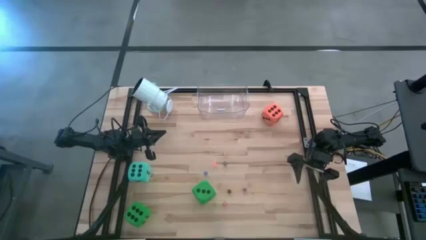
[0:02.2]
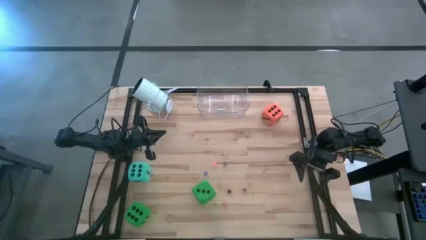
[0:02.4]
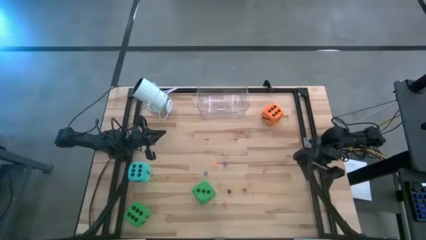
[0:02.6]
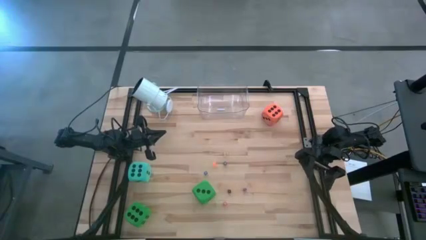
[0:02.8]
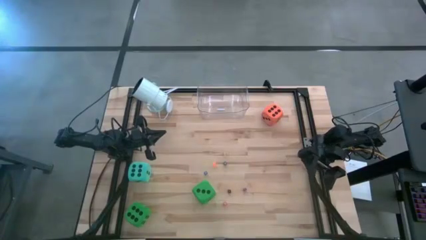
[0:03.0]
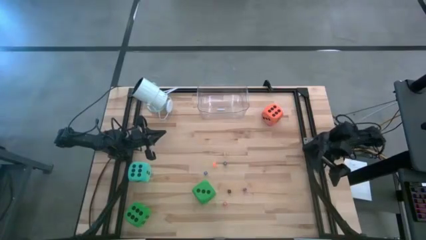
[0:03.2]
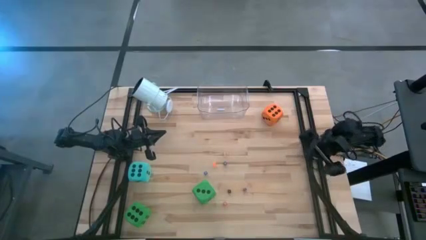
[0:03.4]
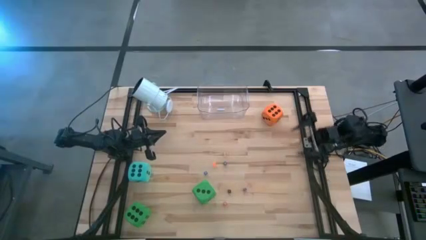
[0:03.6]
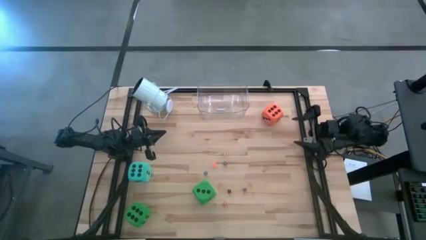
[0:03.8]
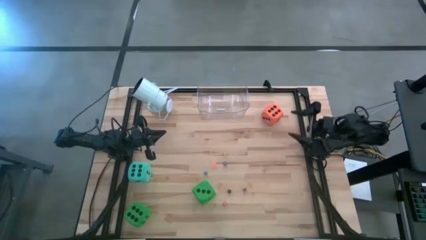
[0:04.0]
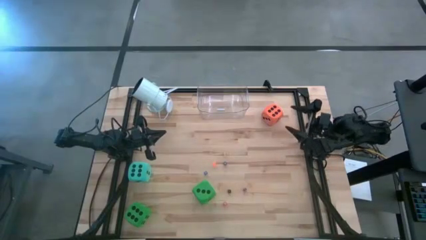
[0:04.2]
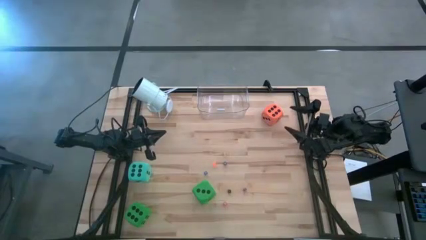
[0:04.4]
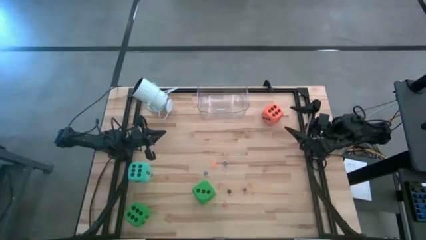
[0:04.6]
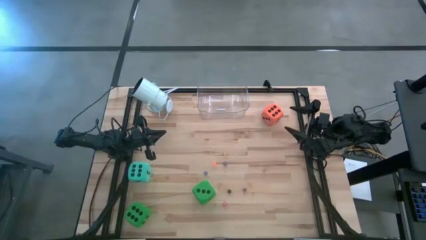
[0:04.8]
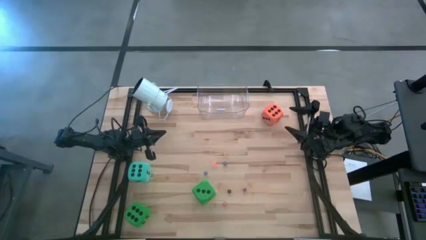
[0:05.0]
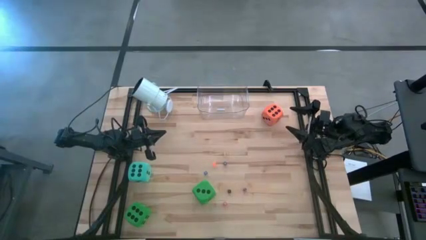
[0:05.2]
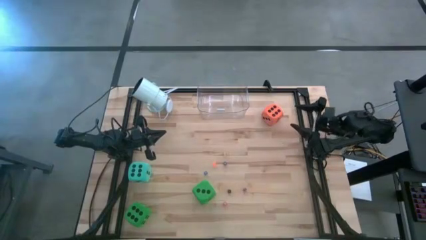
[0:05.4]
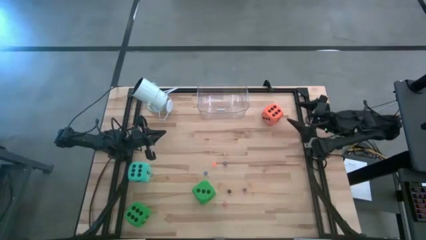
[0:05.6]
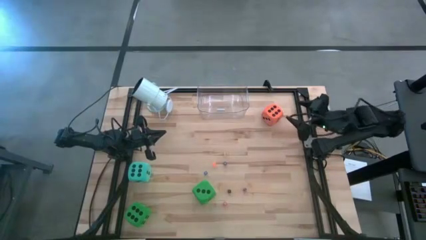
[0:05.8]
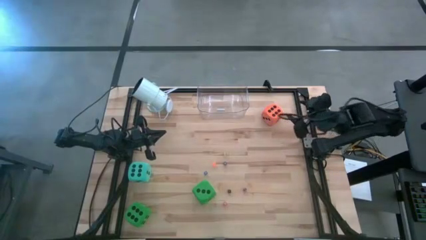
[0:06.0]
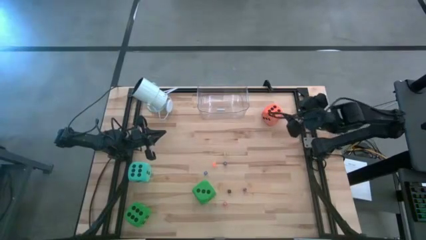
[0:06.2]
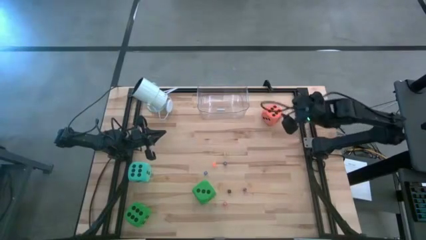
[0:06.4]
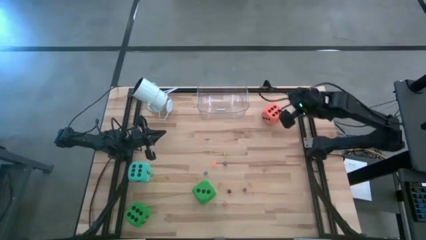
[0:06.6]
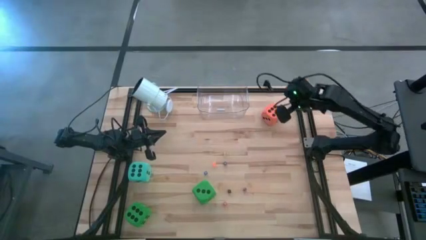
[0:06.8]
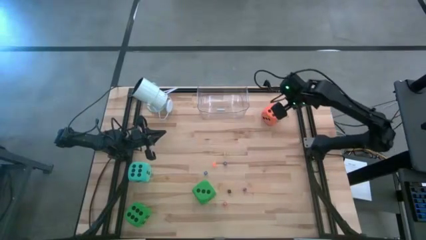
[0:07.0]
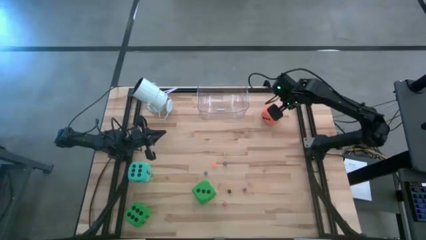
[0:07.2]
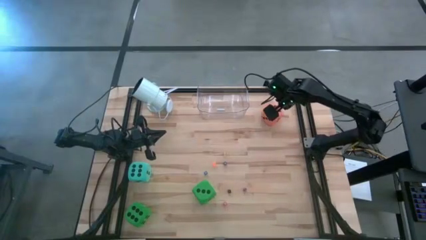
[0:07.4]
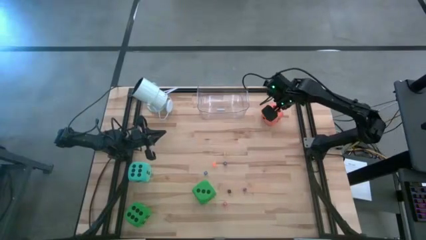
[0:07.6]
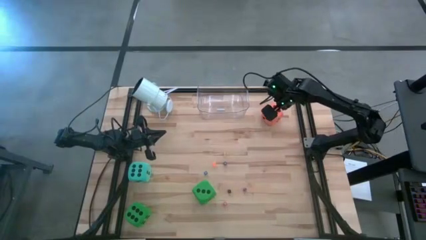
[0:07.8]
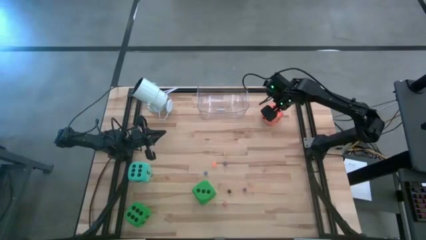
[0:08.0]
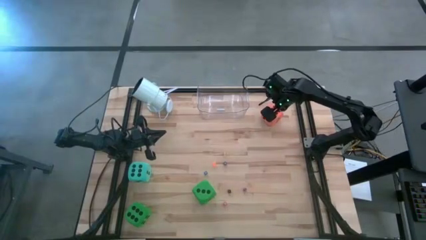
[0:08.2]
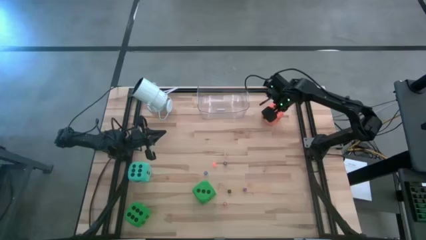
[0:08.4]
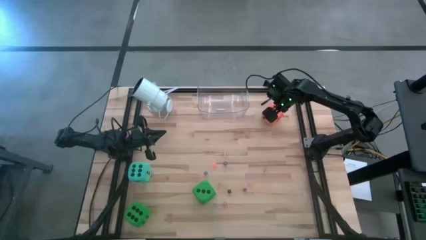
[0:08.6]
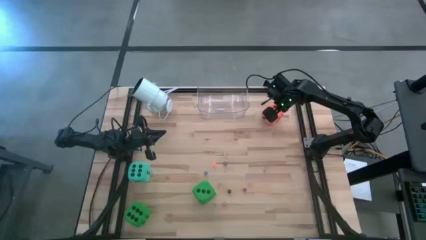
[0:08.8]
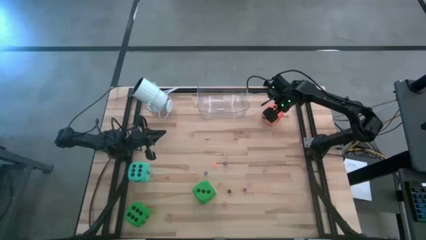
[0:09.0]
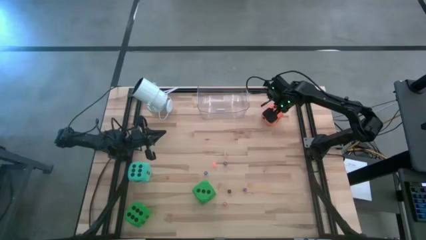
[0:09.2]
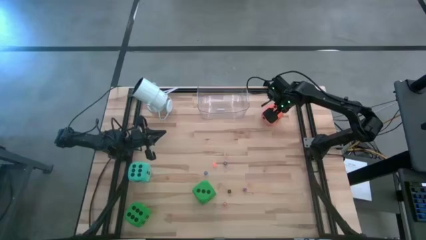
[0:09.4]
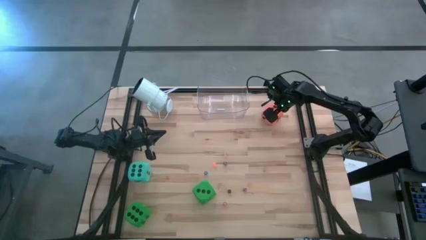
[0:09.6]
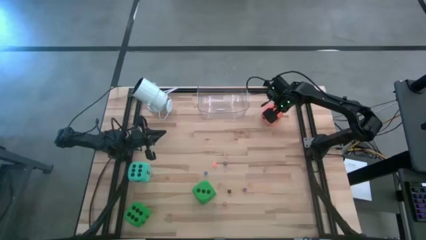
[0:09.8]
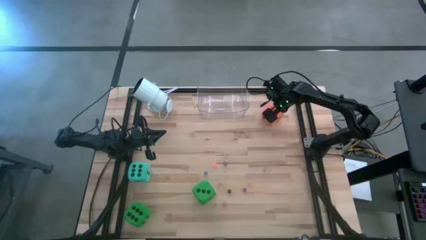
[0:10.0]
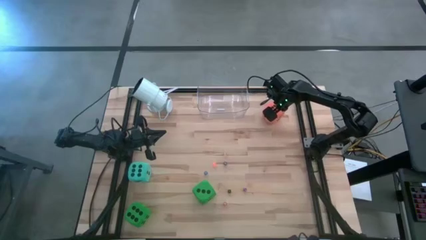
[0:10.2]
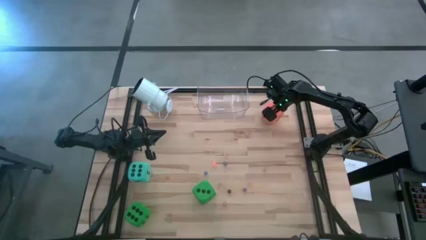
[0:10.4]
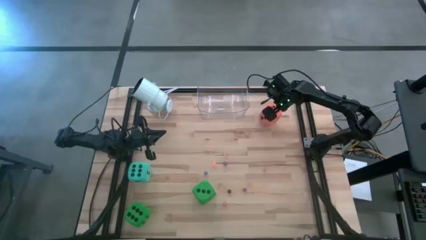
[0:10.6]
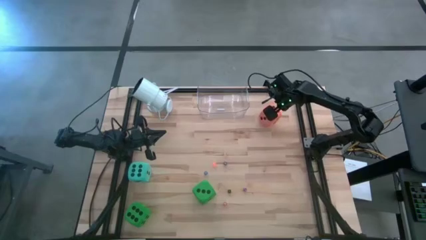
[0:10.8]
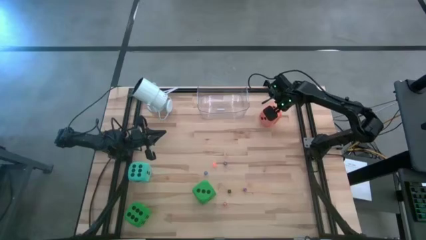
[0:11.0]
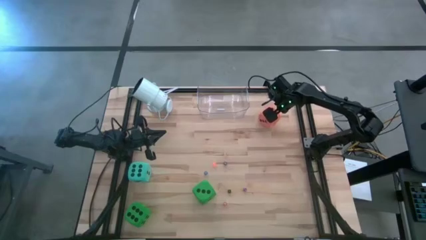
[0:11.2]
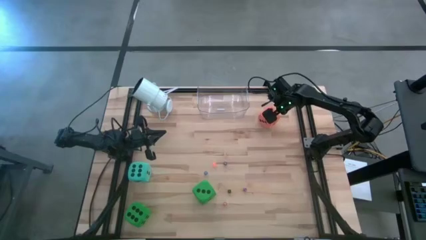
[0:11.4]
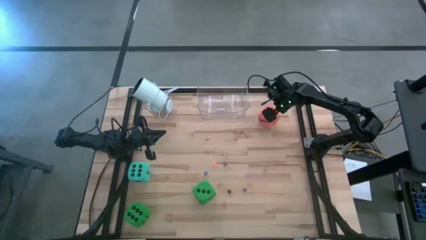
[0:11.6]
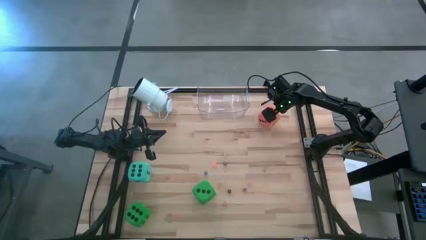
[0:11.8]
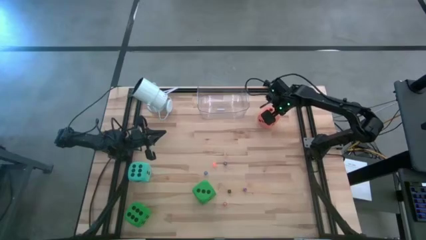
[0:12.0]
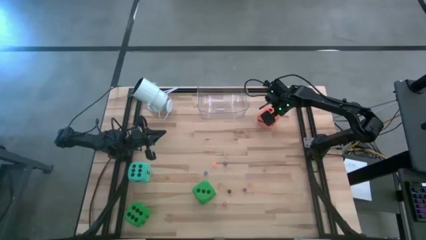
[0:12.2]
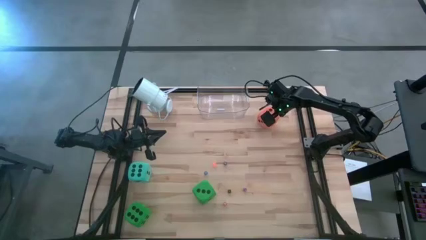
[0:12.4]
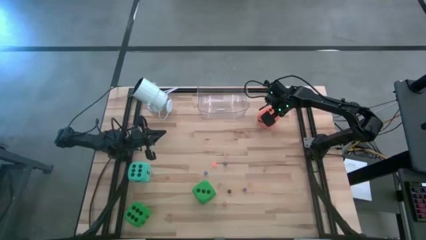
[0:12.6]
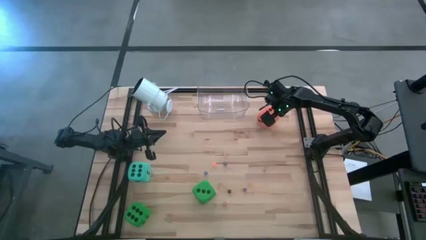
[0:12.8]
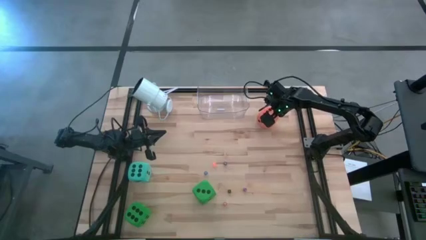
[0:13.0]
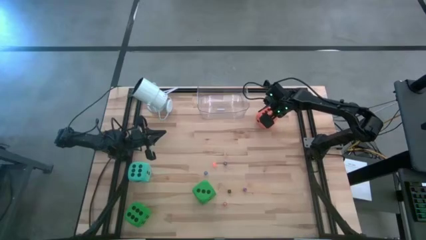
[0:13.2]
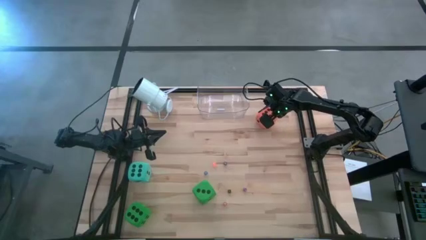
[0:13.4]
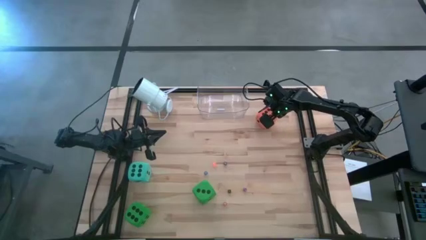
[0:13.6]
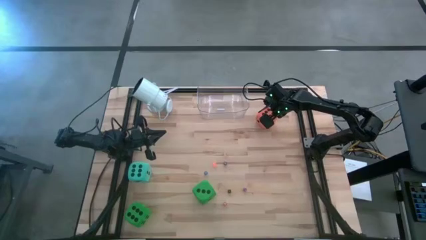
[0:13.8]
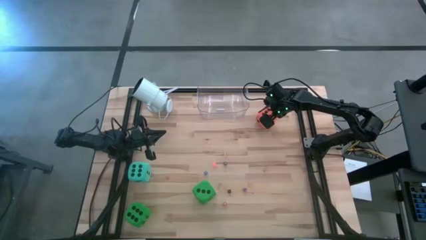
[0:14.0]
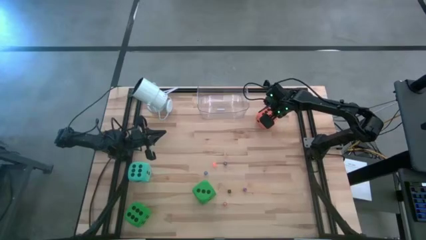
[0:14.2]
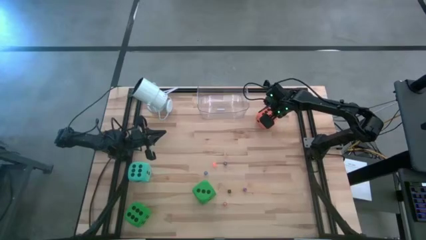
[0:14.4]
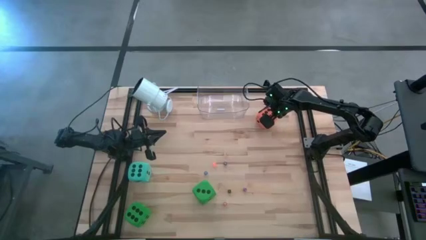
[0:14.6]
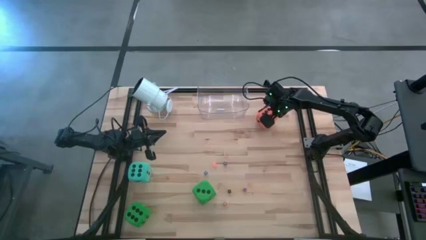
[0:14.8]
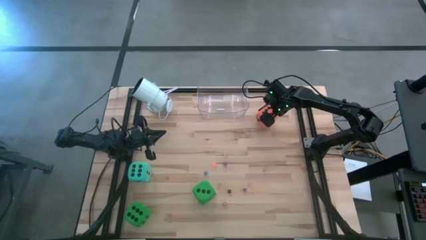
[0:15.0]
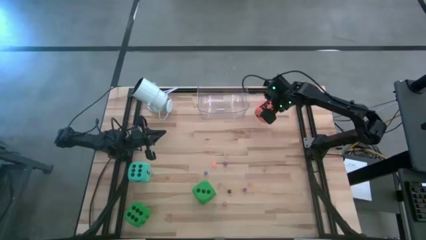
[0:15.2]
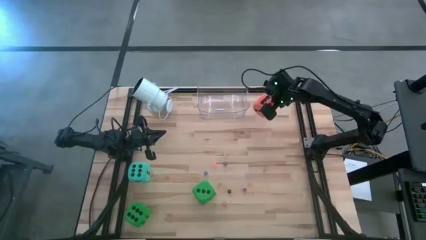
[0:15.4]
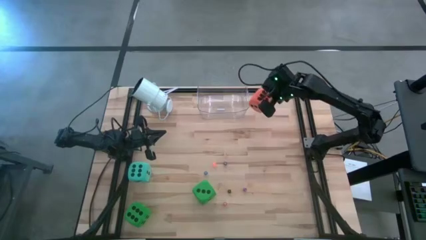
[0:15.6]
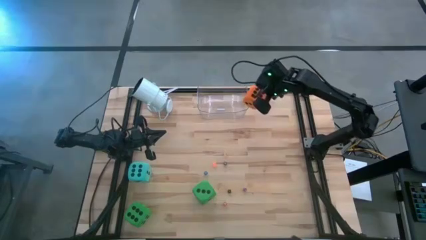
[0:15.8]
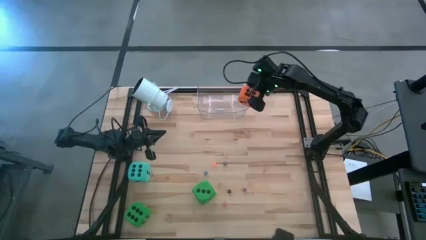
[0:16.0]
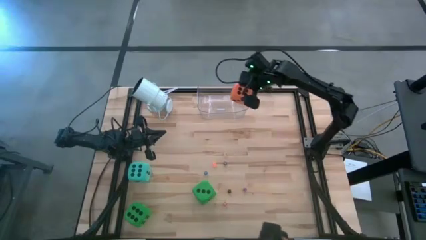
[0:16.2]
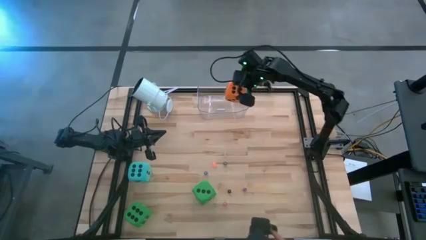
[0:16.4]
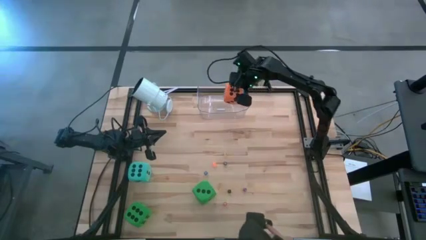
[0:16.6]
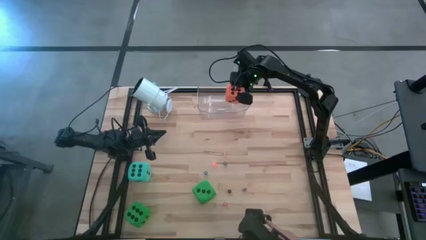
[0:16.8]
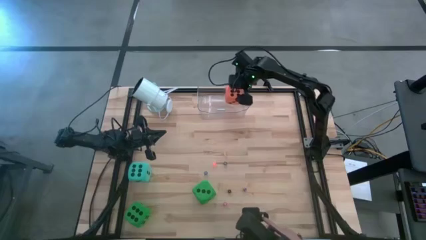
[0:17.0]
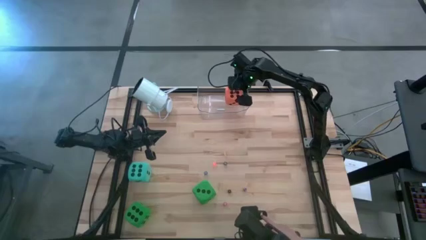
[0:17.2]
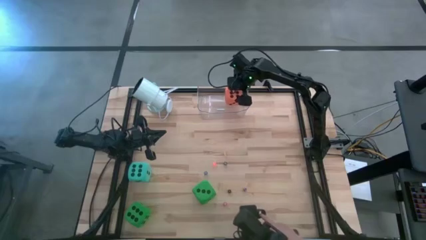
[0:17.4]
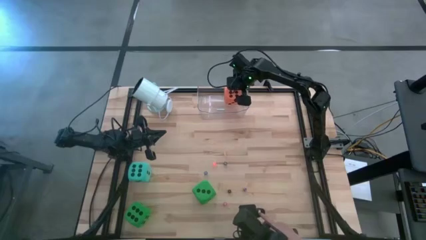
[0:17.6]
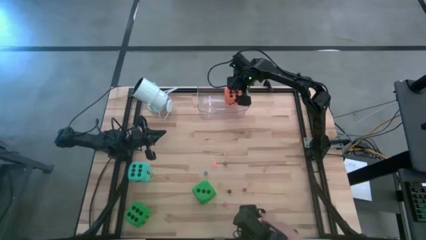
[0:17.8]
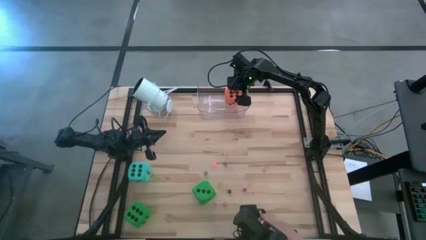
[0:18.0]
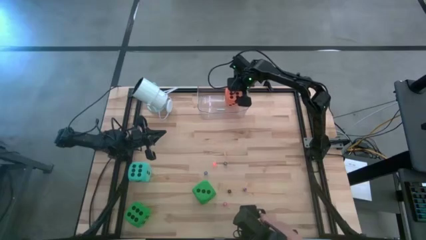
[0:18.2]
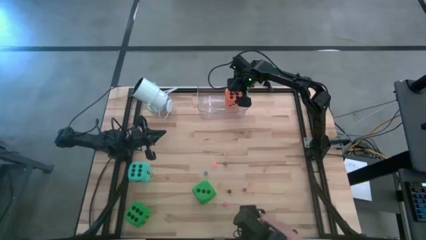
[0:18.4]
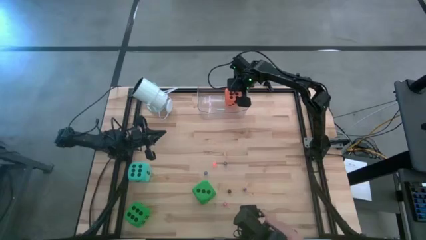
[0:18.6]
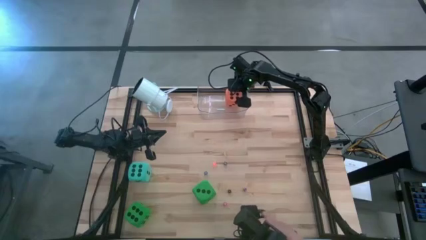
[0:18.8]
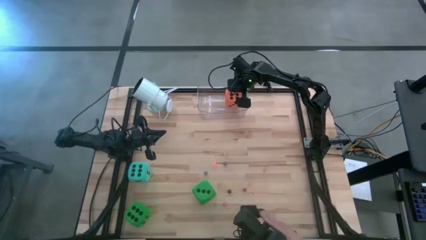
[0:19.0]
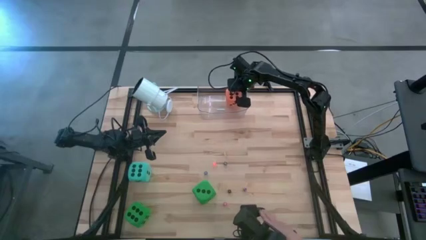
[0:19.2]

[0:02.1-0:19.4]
Task: Pick & Place Dice
Put the big orange dice into the transparent bin
